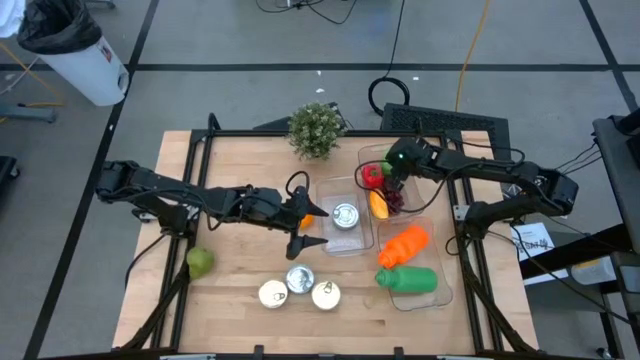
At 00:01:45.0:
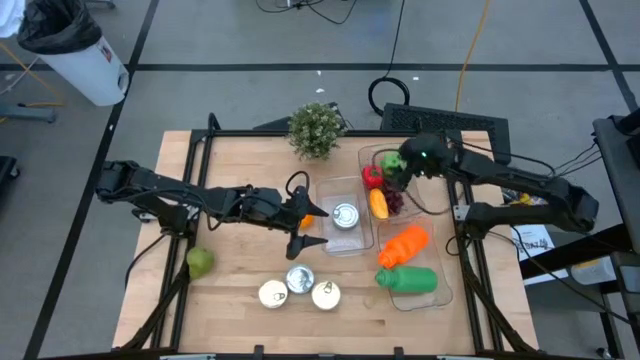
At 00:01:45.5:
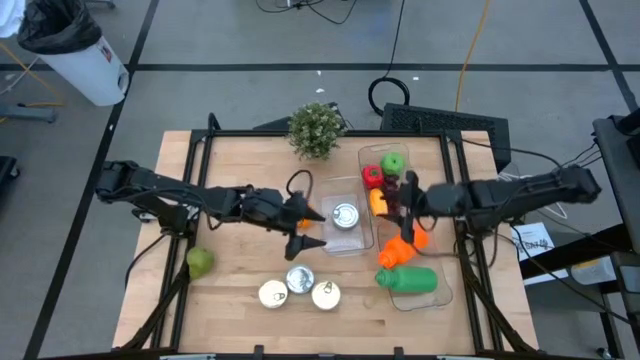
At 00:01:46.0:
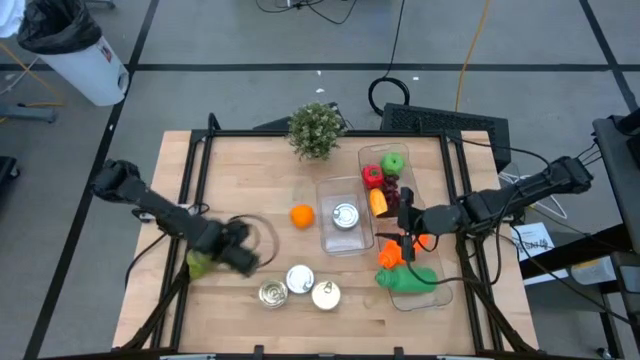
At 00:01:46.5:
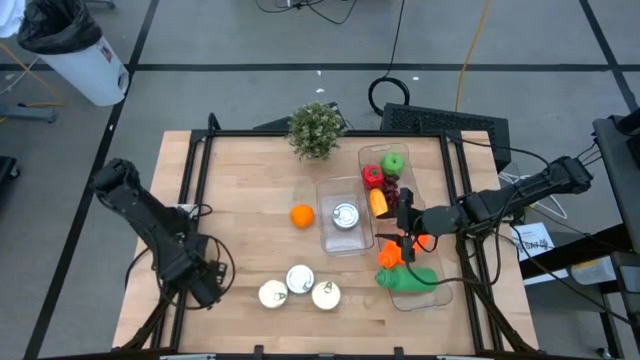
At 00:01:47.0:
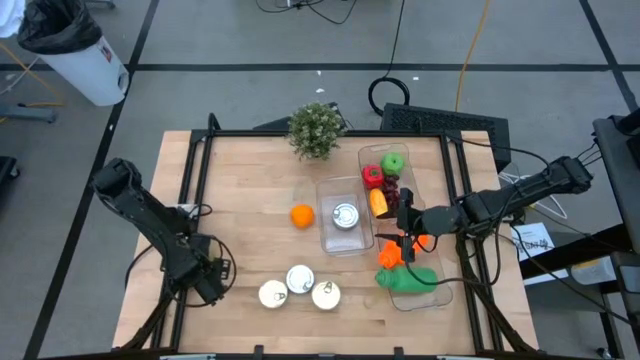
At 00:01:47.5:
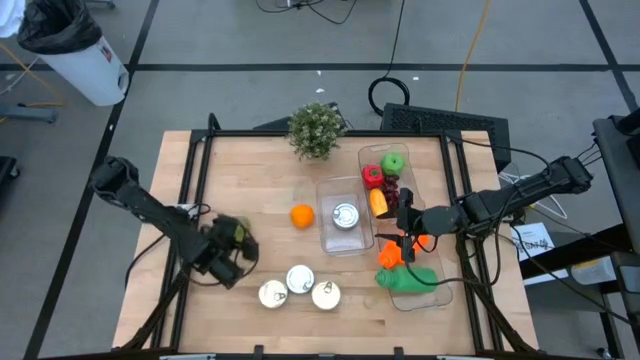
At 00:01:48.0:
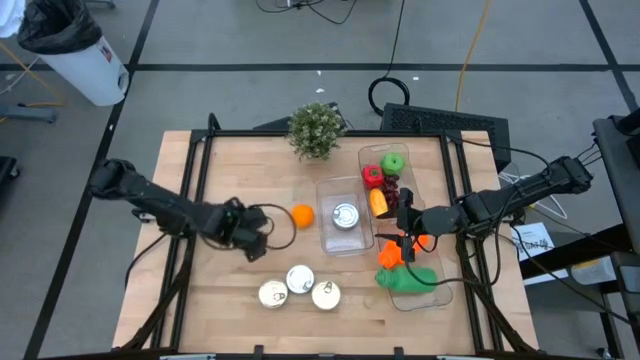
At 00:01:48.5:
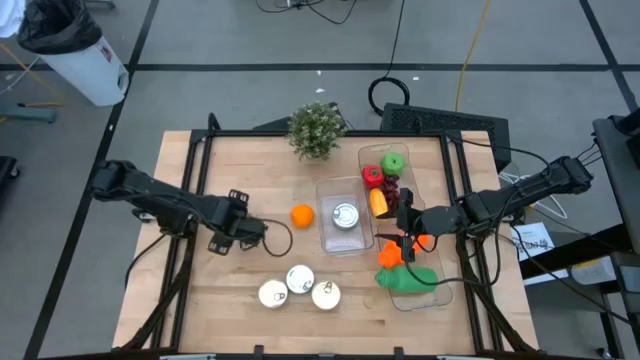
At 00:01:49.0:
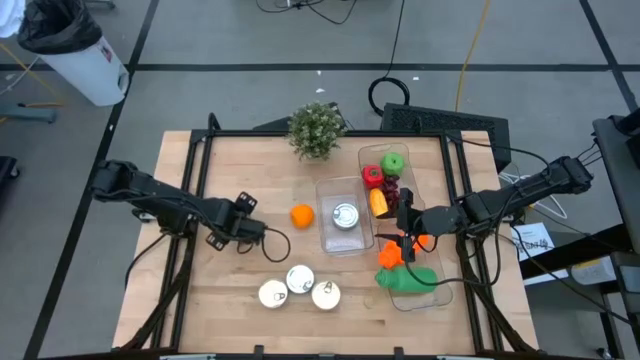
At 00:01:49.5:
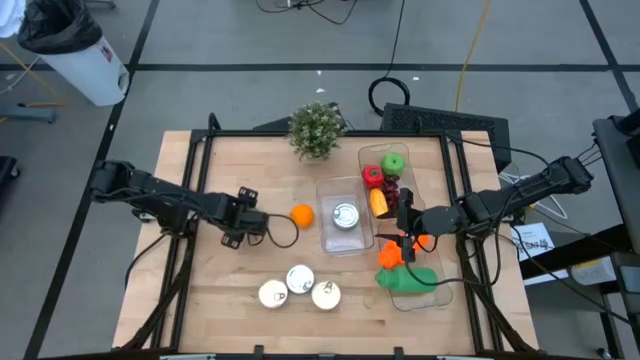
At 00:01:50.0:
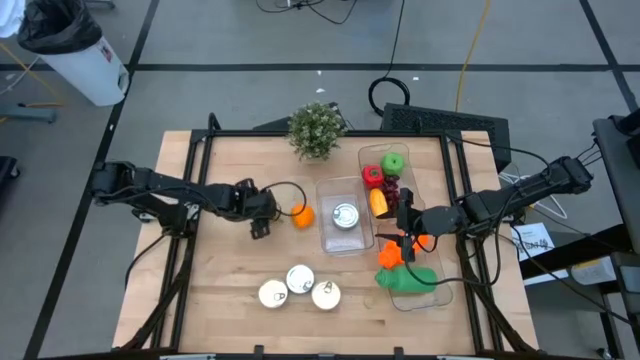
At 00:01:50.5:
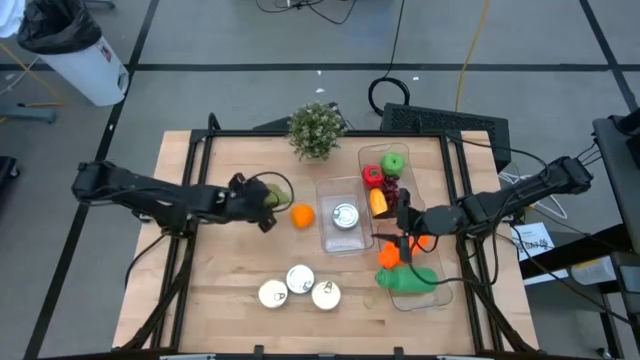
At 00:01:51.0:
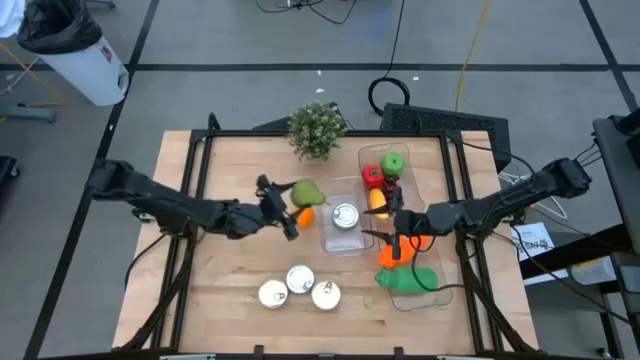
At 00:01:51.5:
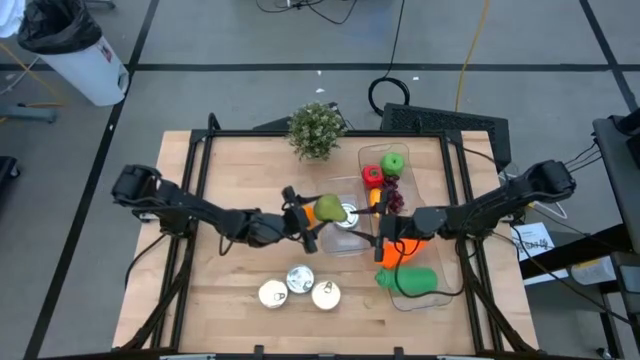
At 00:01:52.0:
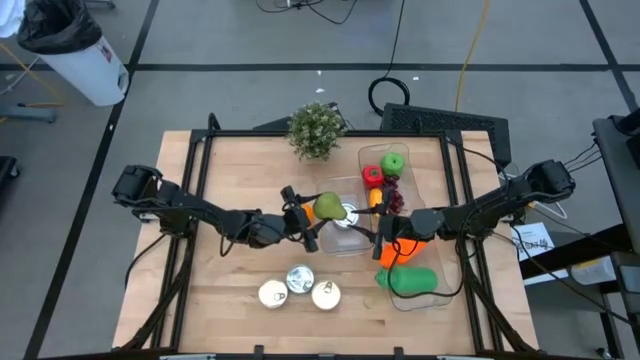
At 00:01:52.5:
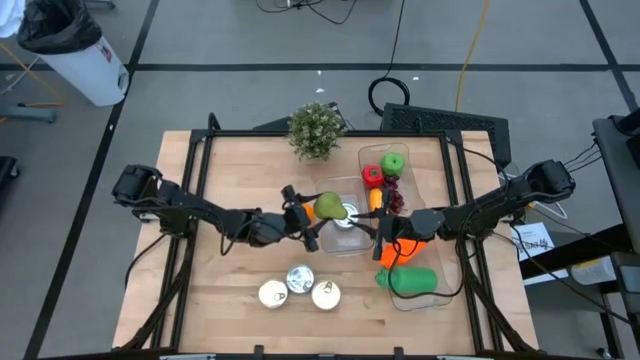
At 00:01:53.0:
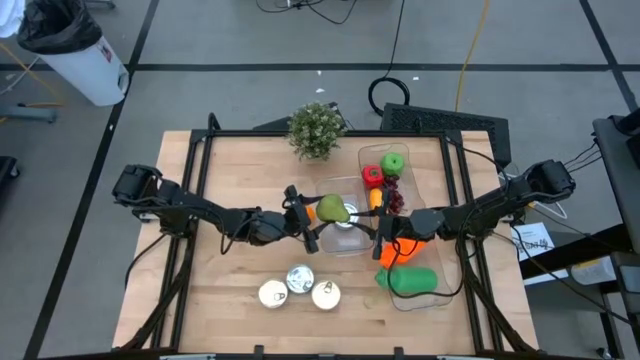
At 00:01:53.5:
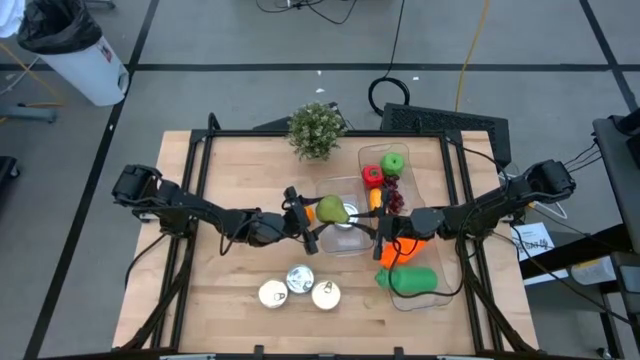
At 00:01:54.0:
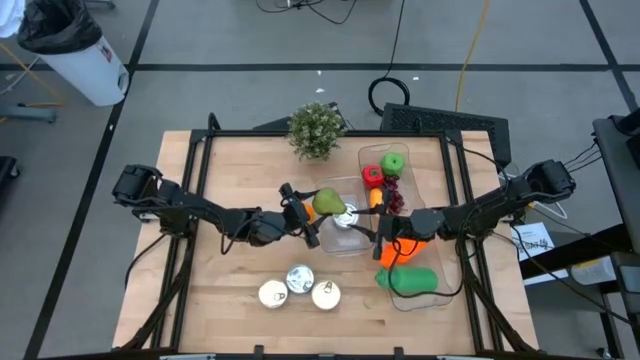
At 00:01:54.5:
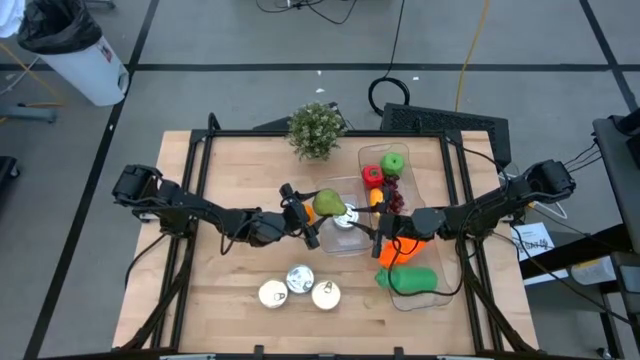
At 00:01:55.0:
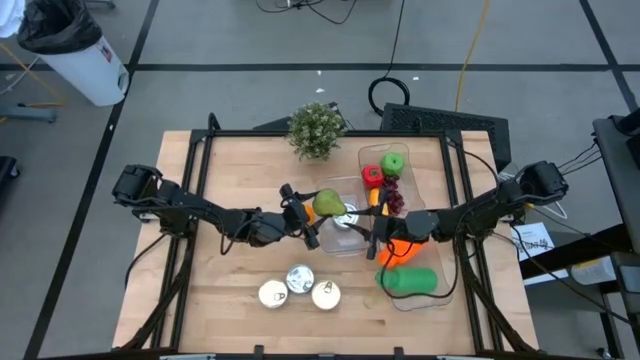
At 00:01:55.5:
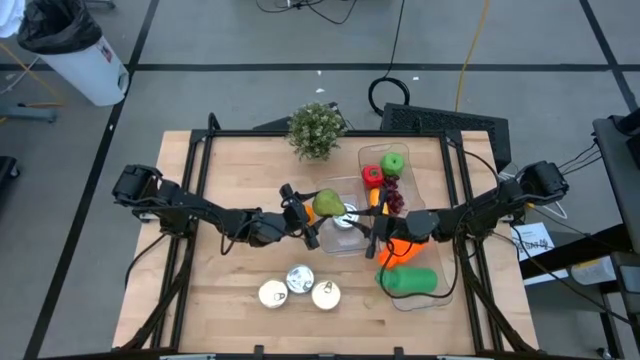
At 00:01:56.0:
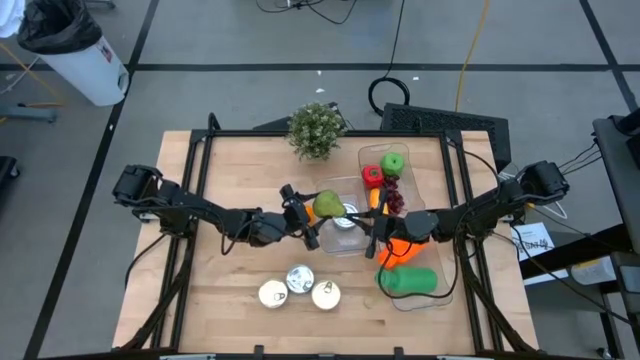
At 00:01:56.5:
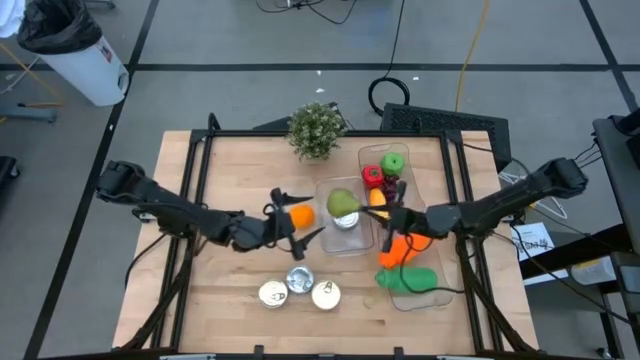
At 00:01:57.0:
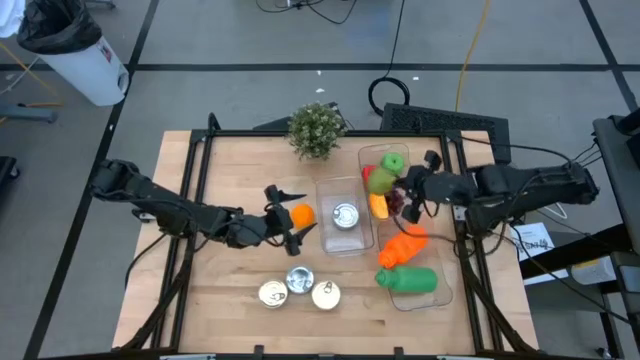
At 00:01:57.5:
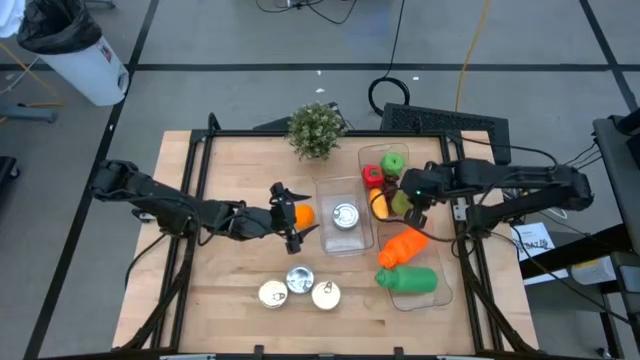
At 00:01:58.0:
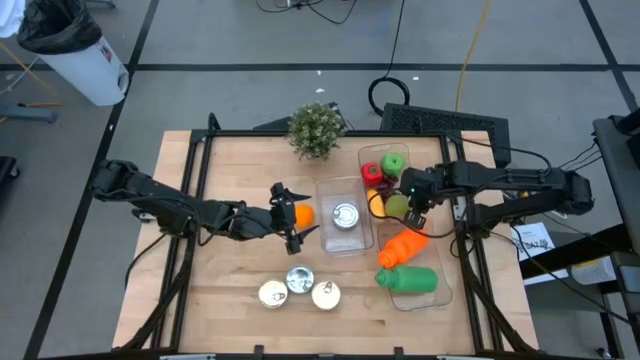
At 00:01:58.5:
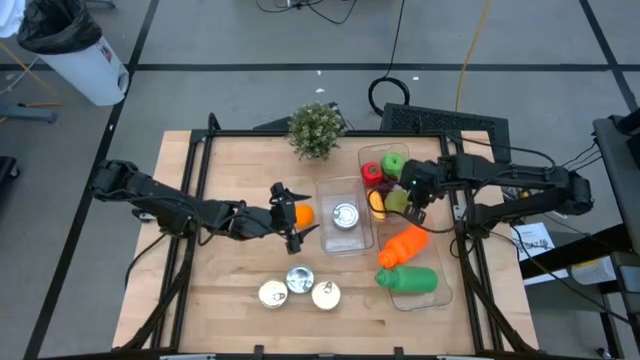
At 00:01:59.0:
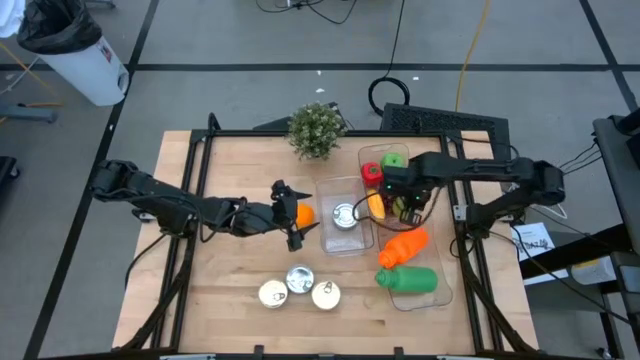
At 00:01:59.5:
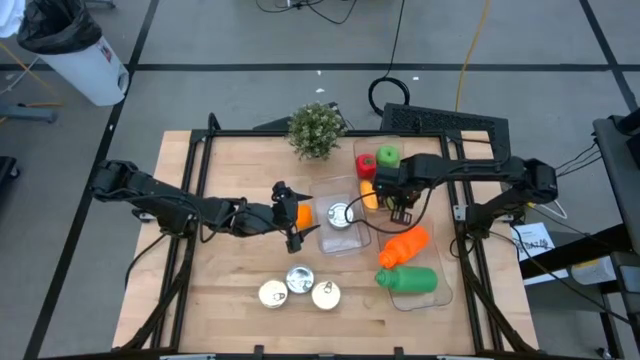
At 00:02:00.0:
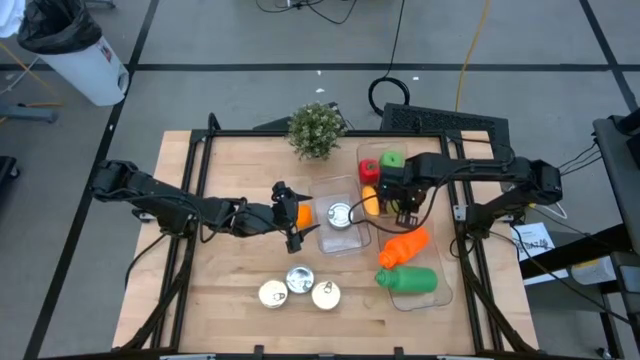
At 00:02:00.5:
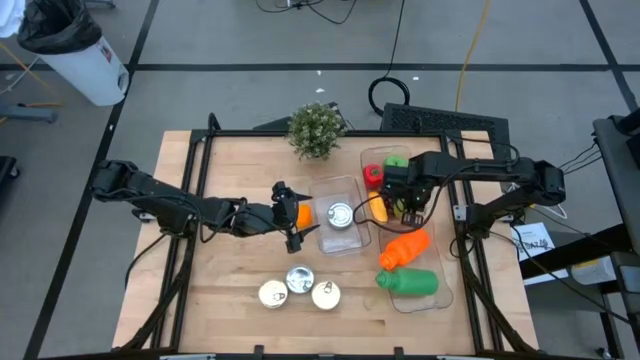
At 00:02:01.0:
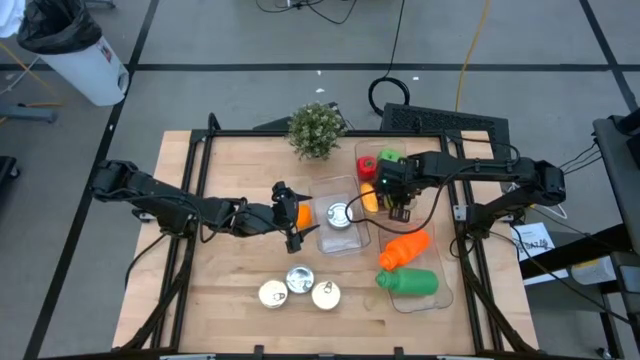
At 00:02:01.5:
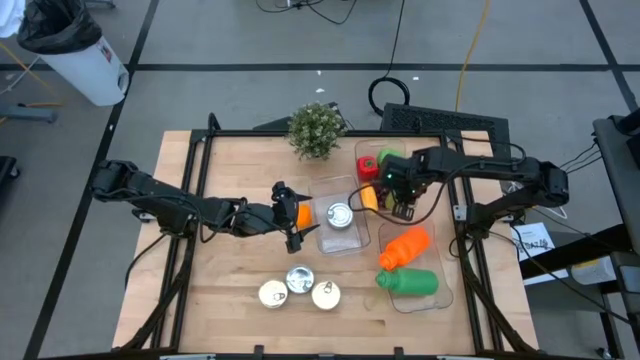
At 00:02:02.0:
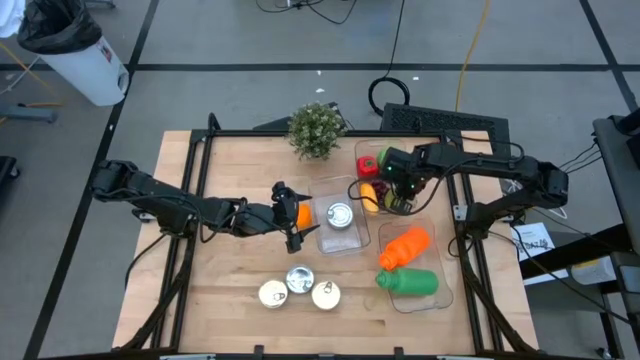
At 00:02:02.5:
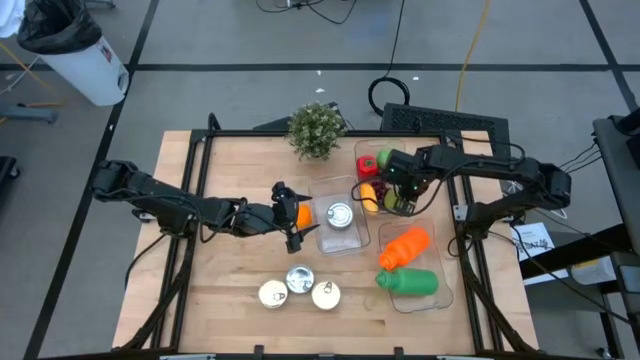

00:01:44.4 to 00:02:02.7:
Task: Pick & Place Food Item
Put the green pear into the top transparent bin

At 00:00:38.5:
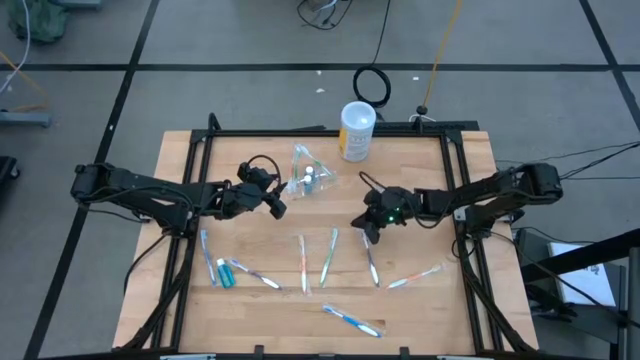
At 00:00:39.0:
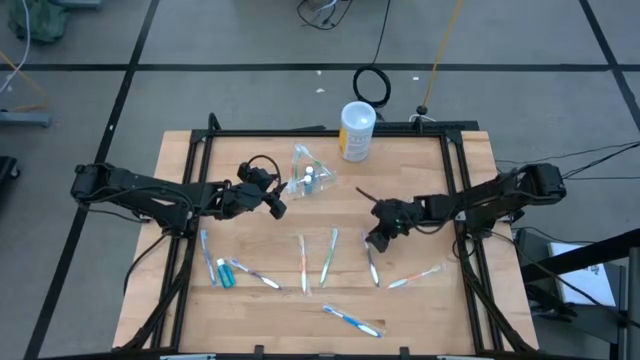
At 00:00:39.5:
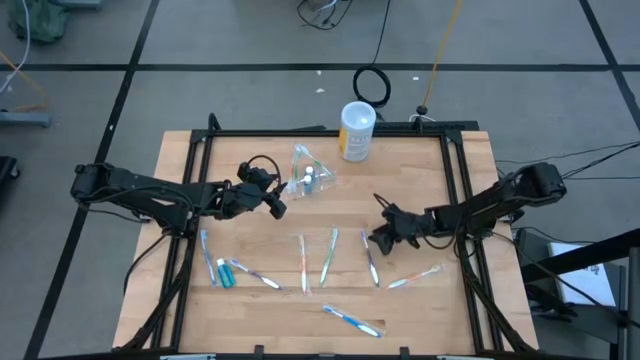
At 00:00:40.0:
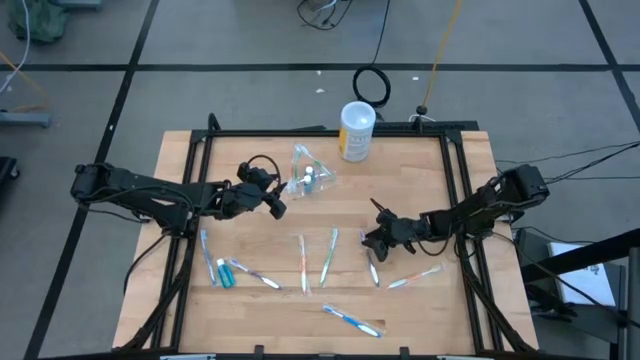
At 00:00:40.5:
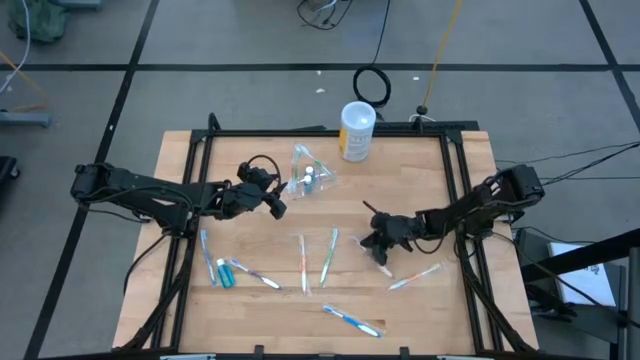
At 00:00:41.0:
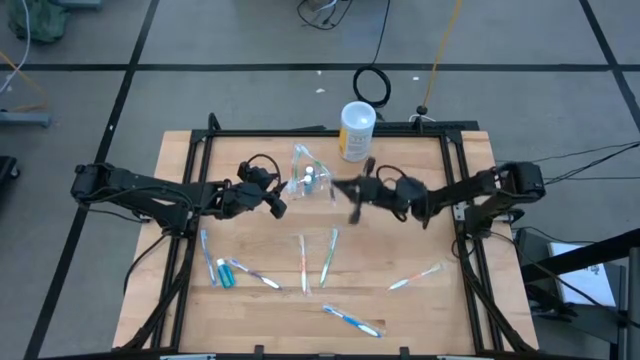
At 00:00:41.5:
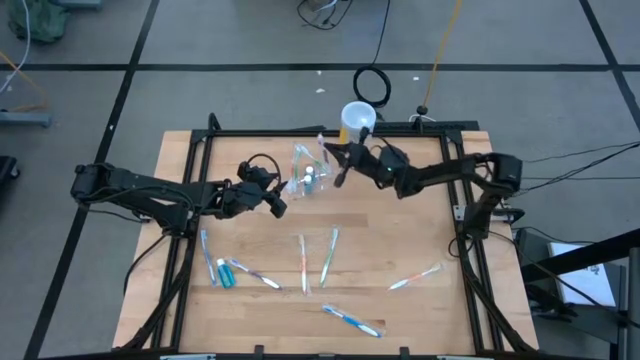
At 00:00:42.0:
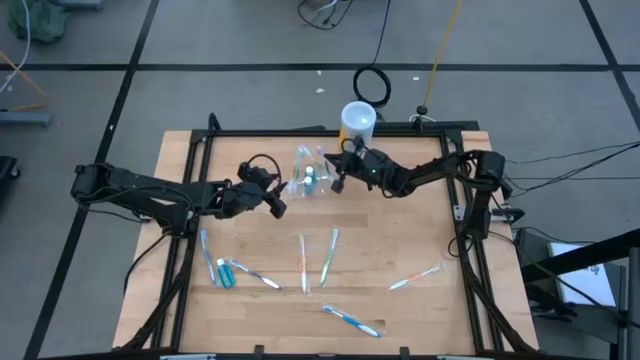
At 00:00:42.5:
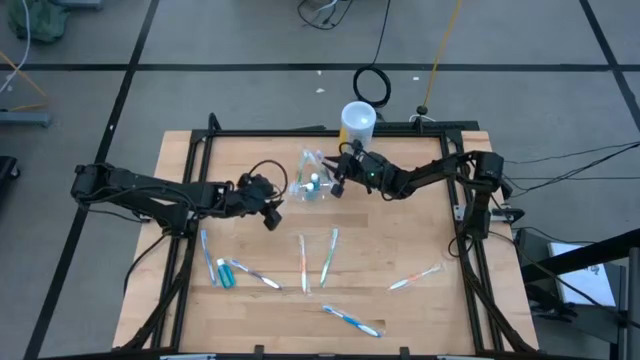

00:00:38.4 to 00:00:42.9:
Task: Pick & Place toothbrushing station
Put the right purple toothbrush into the transparent organizer
